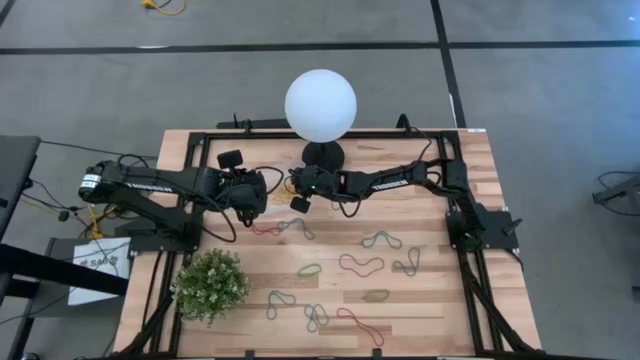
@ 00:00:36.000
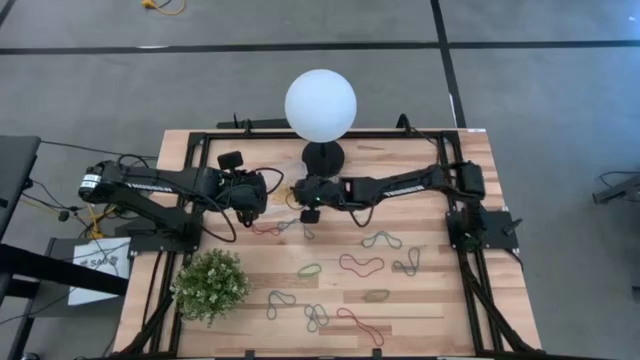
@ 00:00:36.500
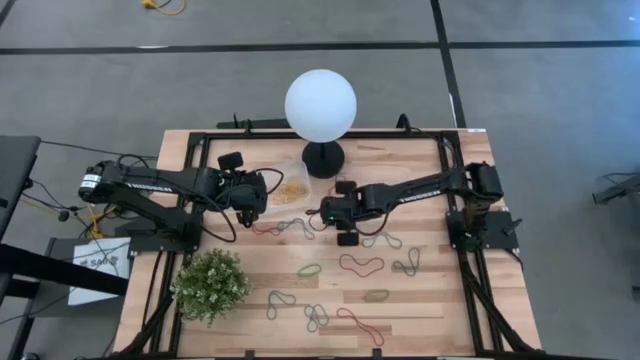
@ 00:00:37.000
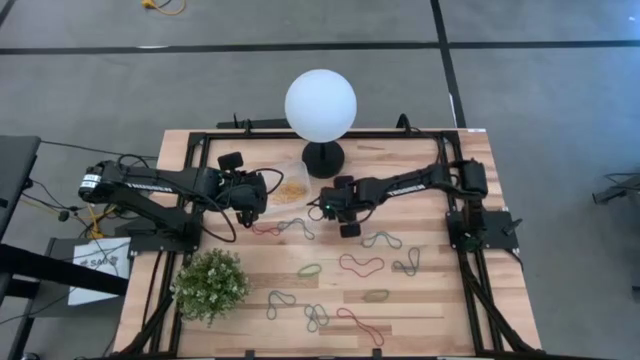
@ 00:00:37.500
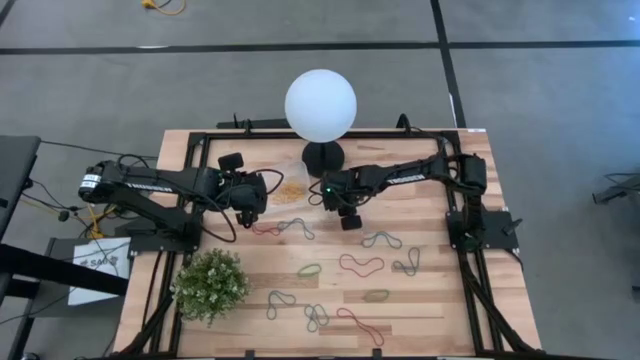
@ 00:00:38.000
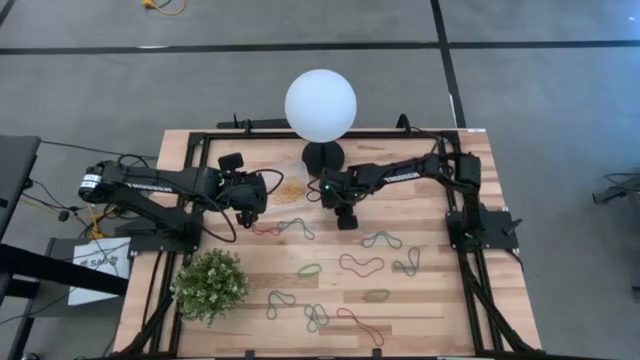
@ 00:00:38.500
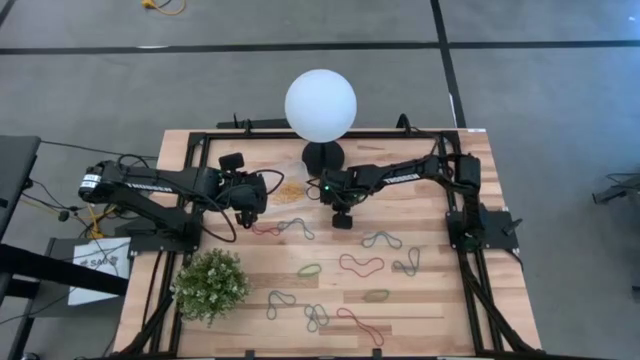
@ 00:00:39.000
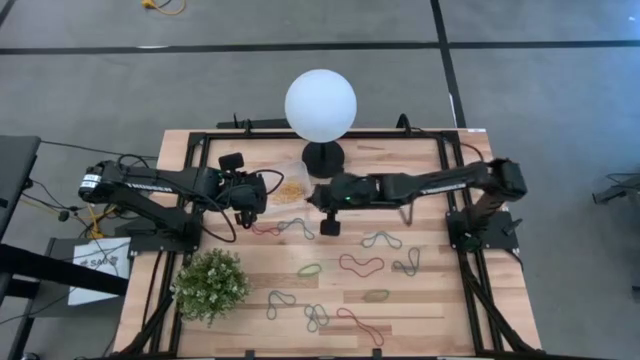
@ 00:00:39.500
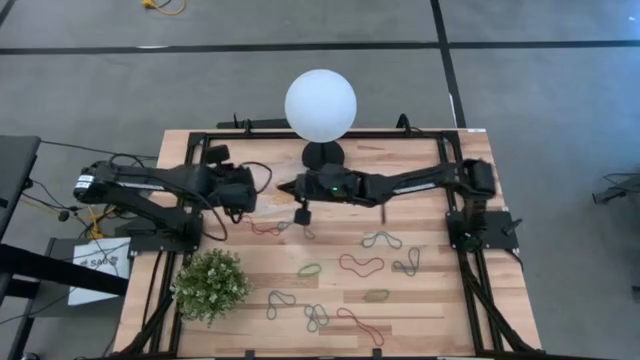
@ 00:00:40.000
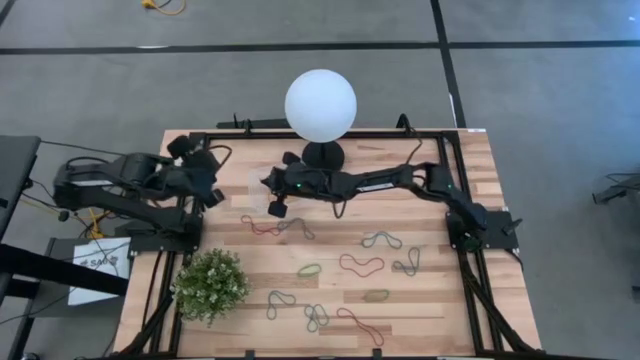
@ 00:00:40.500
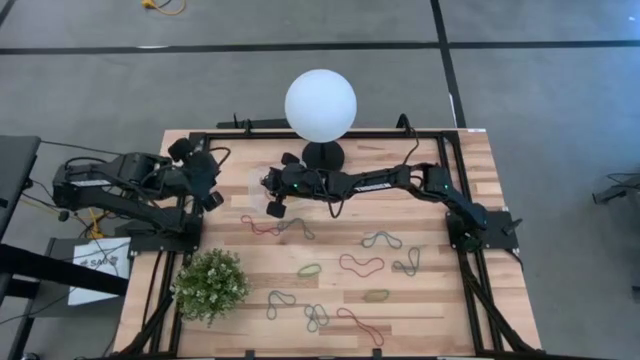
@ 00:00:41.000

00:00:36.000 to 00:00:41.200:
Task: Pick and place items into bin
Put the red rubber band into the transparent bin

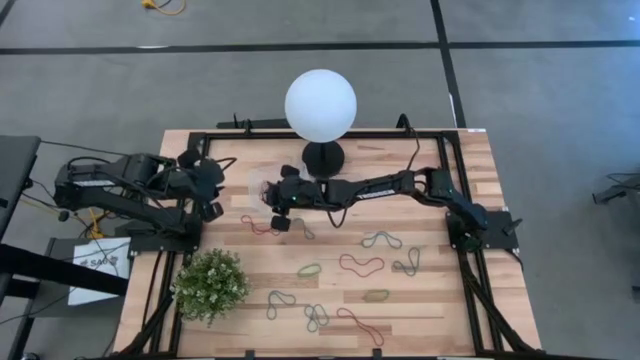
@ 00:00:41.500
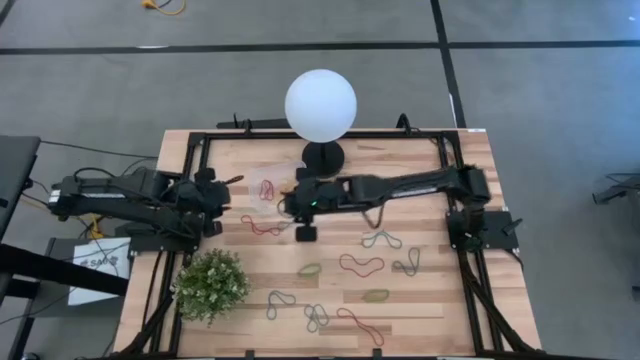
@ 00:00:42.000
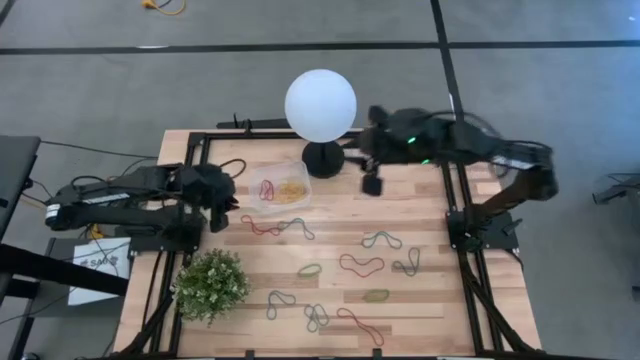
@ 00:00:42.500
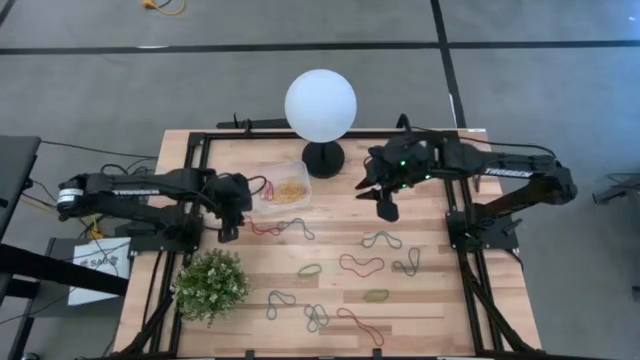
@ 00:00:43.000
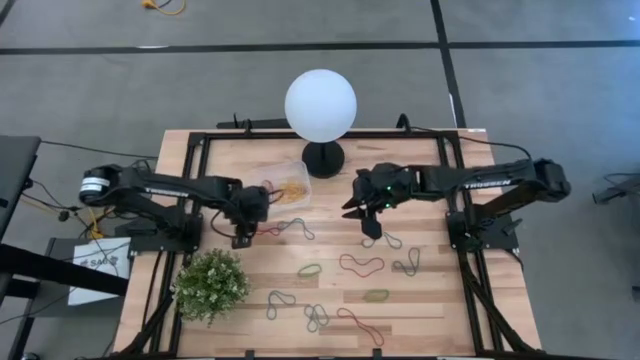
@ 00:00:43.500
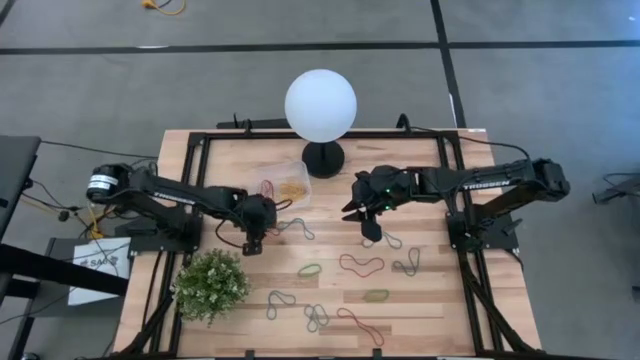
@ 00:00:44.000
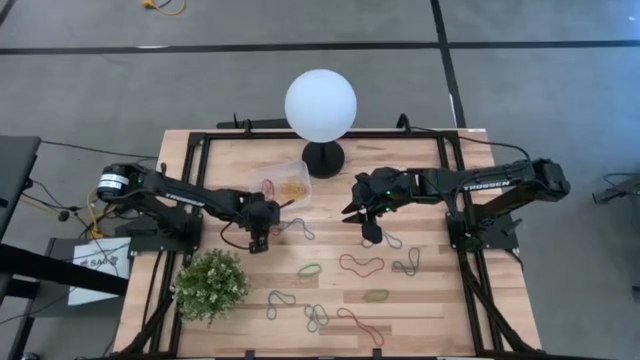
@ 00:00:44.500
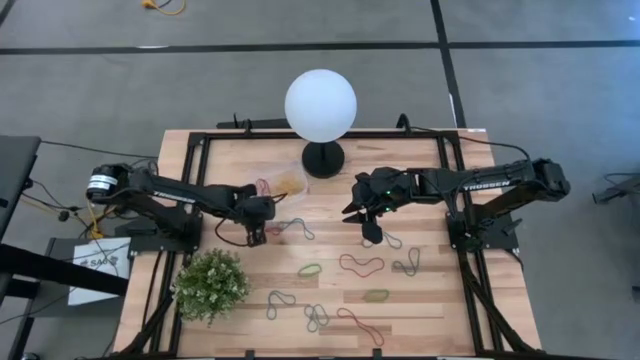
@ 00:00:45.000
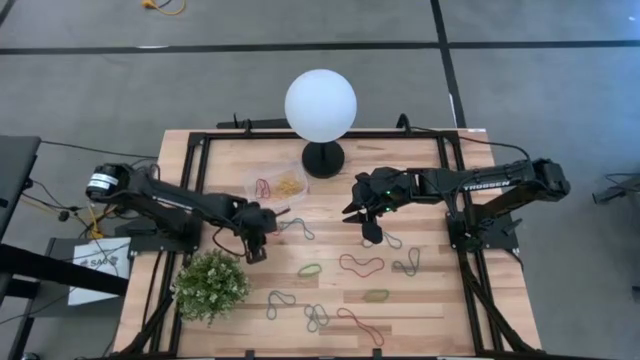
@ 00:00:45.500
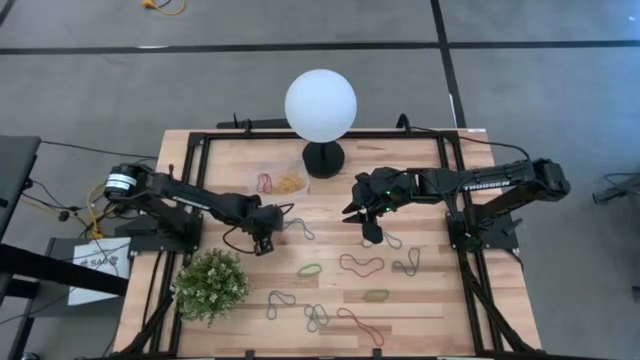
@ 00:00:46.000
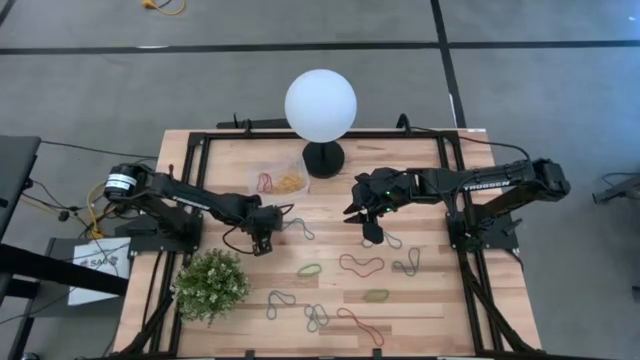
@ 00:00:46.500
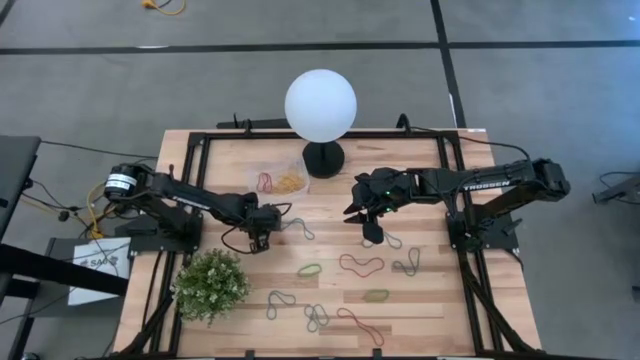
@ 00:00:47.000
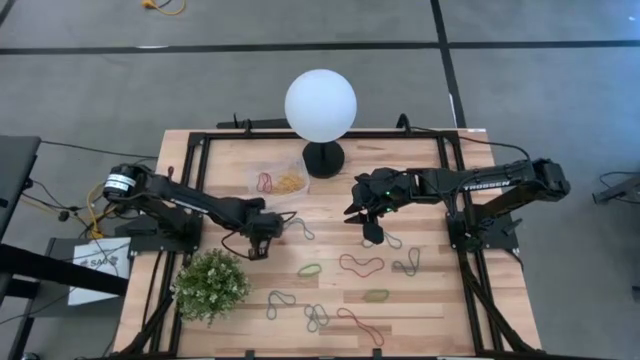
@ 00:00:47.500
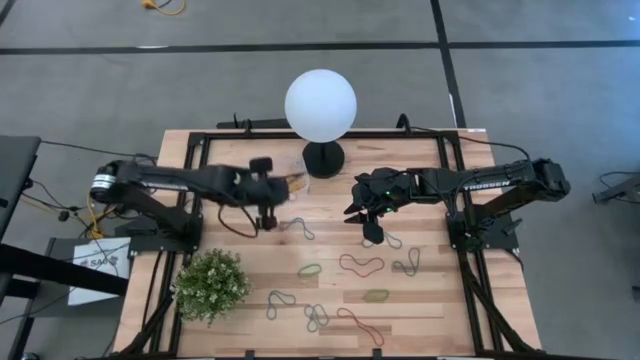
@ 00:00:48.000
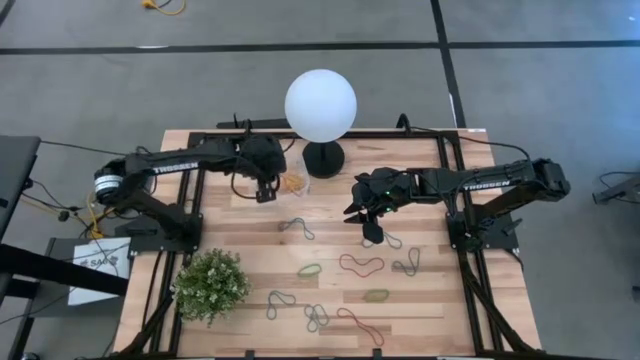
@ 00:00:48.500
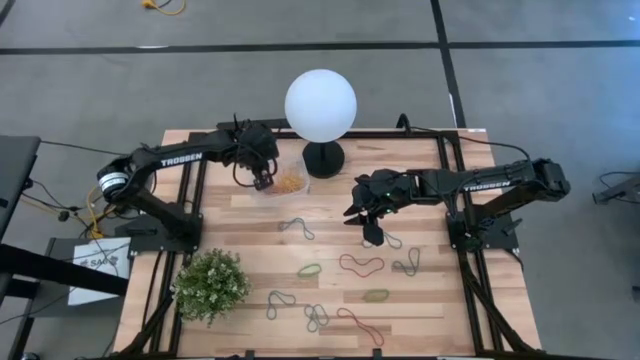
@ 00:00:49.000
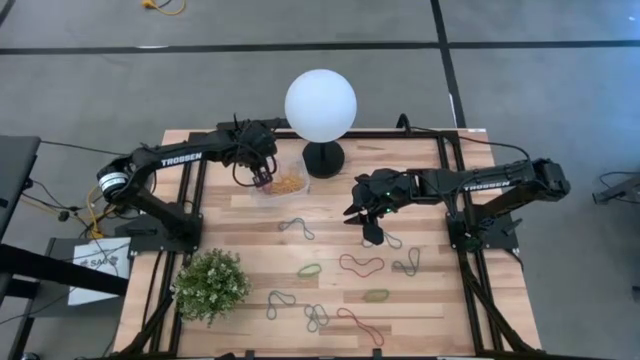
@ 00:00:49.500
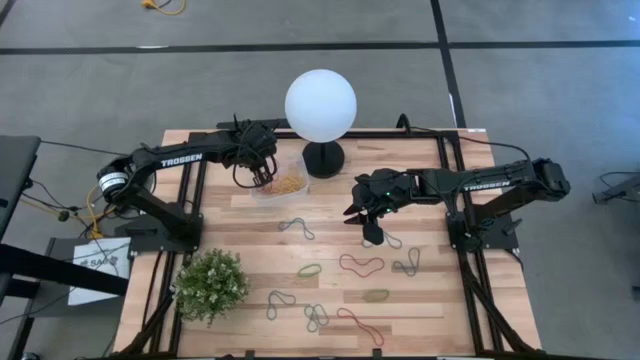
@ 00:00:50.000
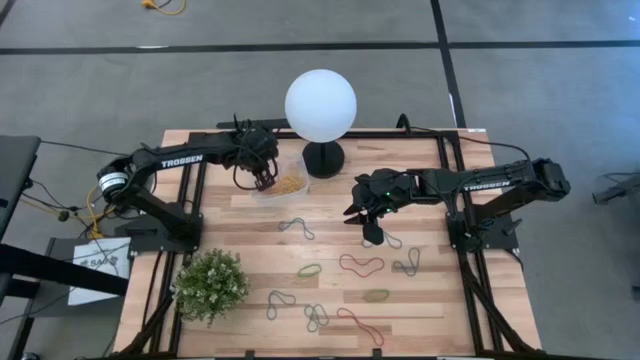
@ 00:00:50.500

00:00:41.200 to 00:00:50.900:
Put the red rubber band into the transparent bin

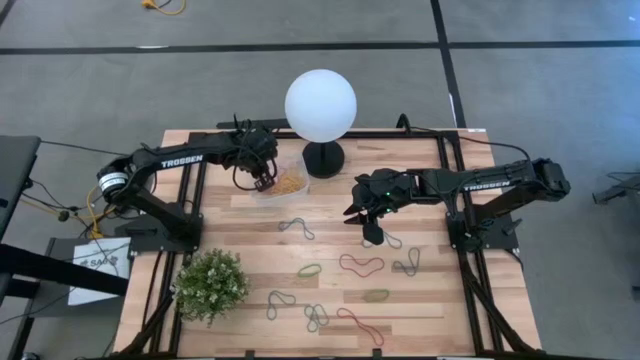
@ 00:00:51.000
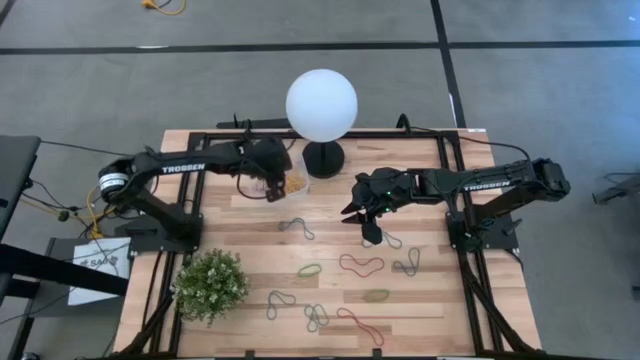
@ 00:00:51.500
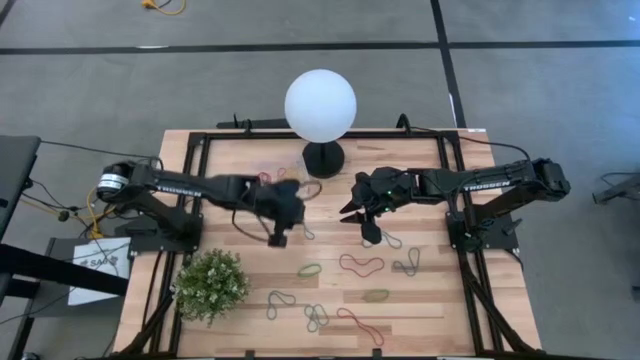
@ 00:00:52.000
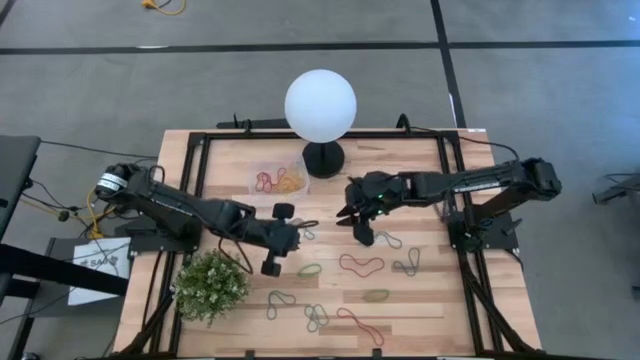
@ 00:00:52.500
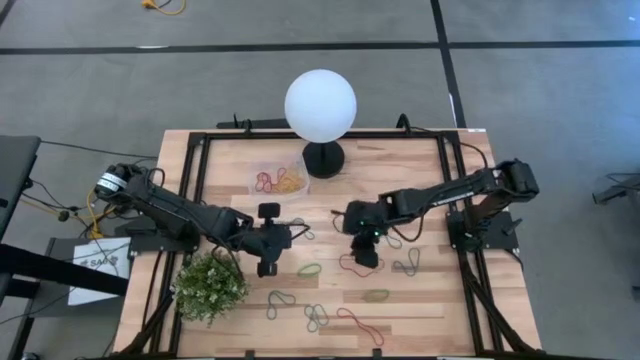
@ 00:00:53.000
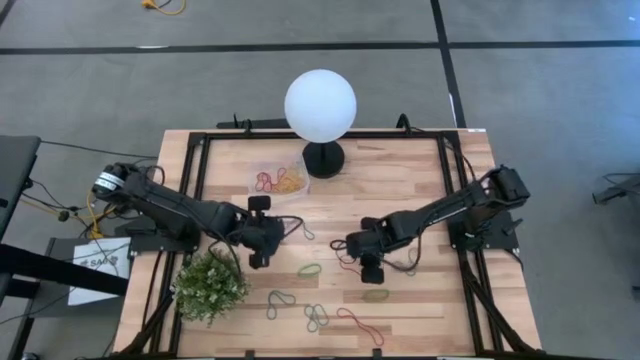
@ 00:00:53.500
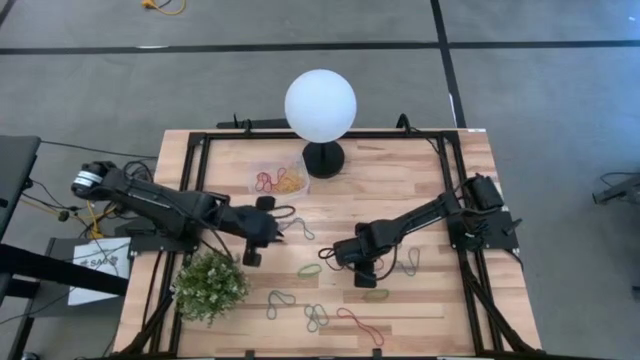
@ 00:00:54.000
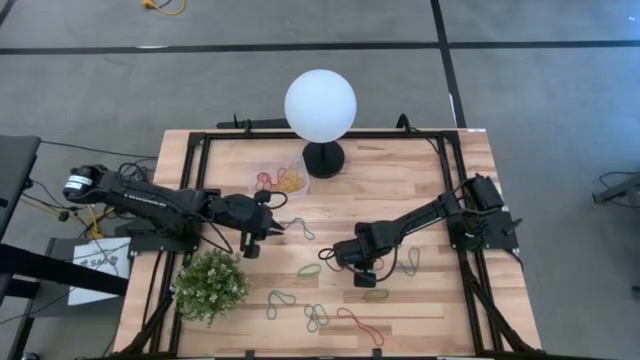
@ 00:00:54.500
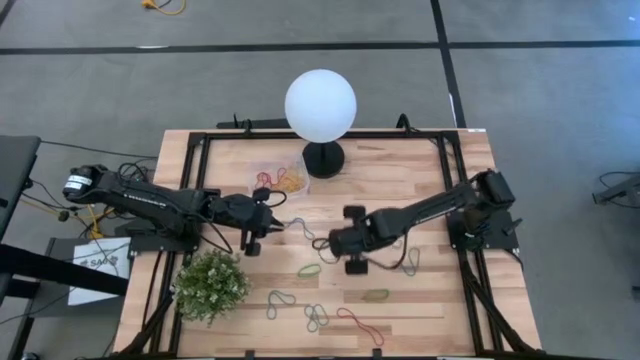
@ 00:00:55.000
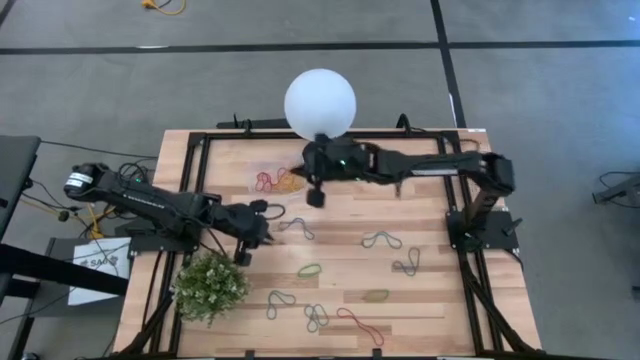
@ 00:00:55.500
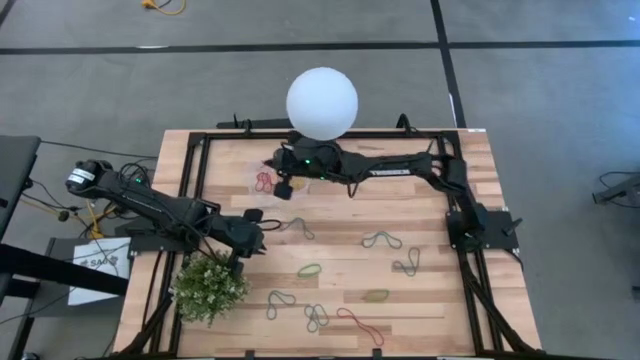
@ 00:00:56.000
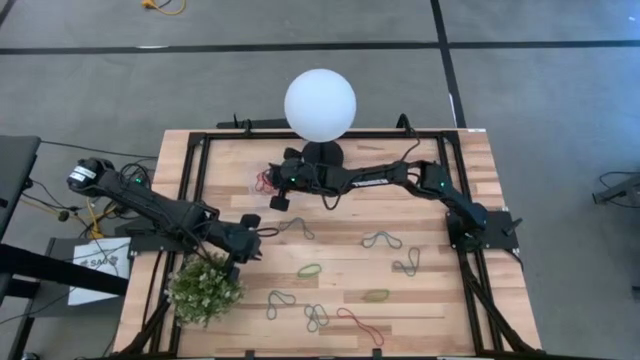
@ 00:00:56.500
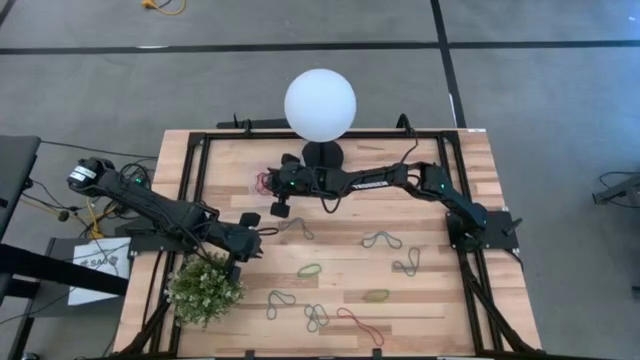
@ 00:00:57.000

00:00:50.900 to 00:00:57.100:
Put the red rubber band into the transparent bin
